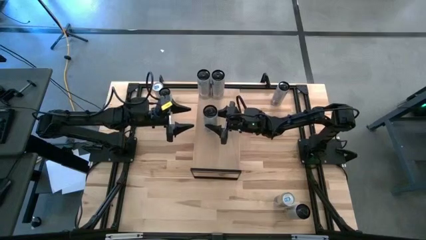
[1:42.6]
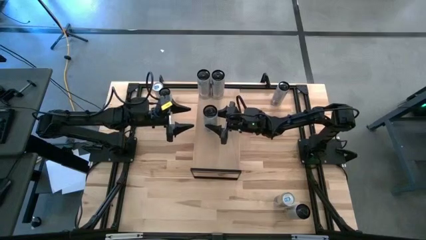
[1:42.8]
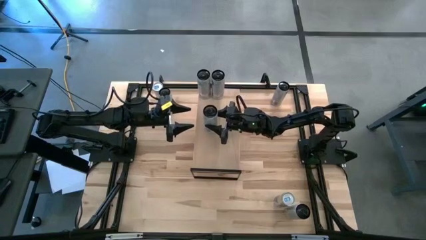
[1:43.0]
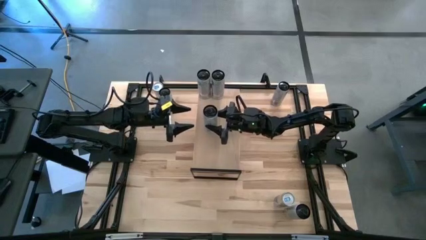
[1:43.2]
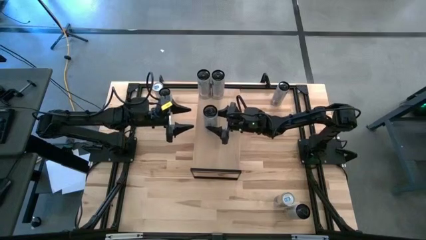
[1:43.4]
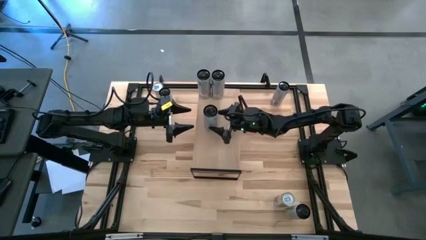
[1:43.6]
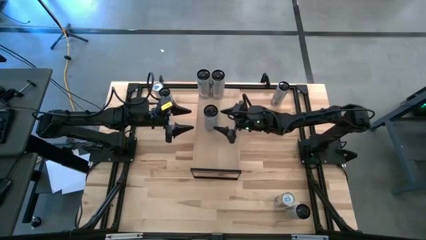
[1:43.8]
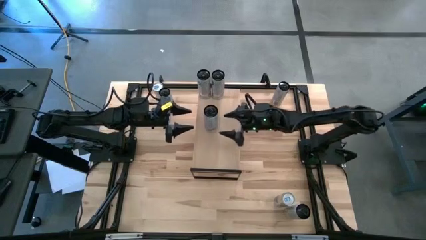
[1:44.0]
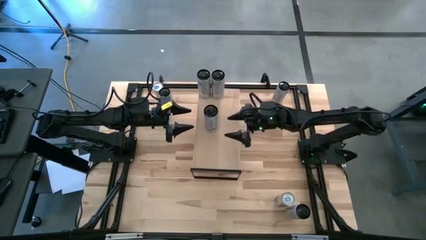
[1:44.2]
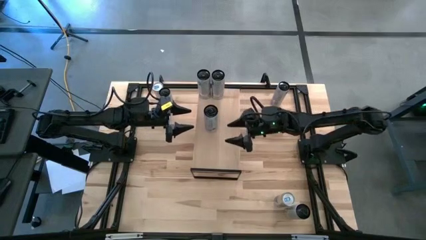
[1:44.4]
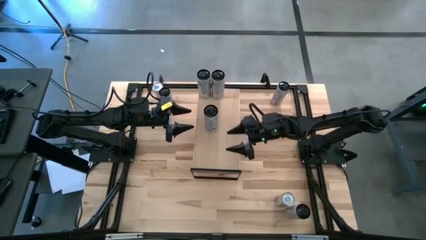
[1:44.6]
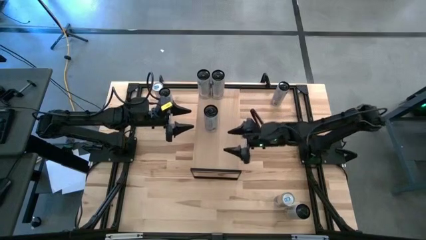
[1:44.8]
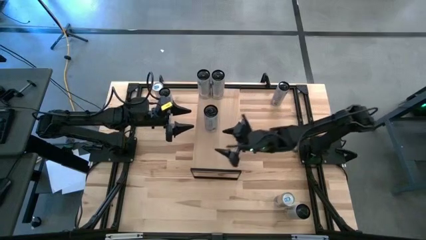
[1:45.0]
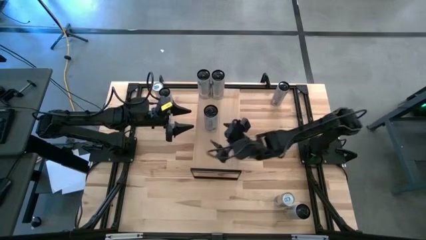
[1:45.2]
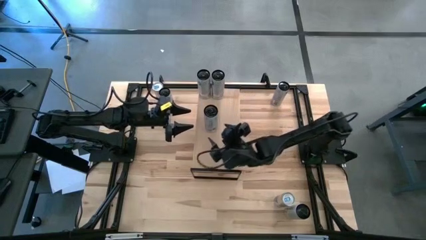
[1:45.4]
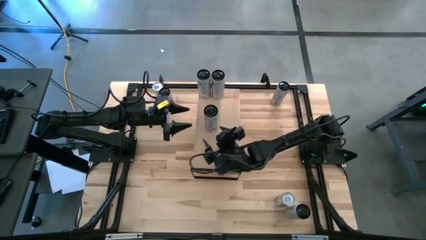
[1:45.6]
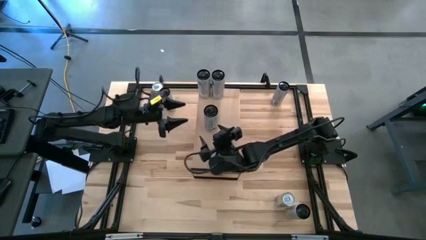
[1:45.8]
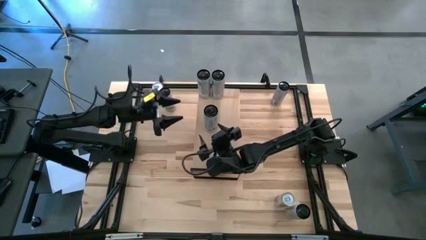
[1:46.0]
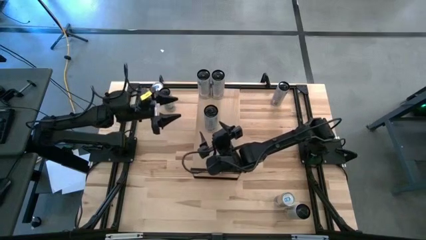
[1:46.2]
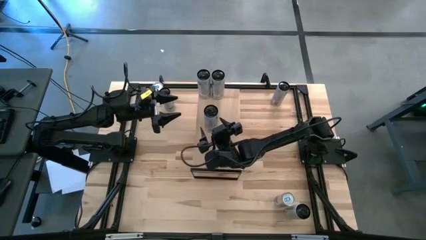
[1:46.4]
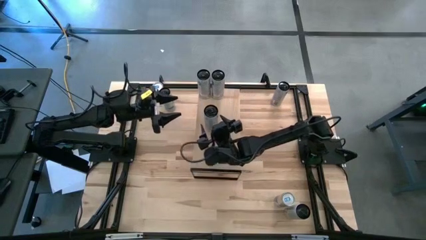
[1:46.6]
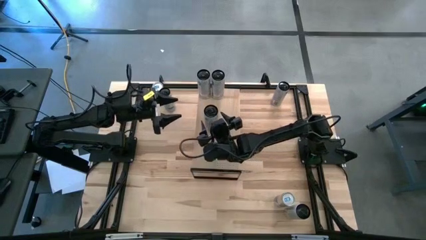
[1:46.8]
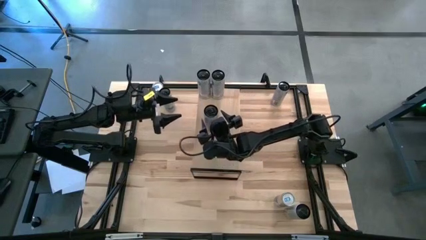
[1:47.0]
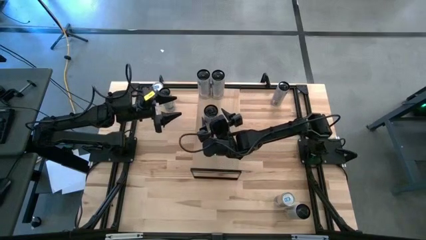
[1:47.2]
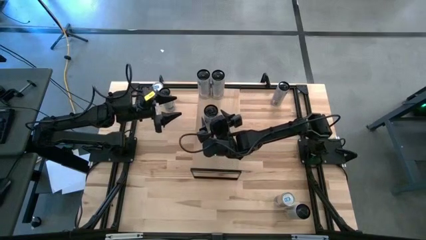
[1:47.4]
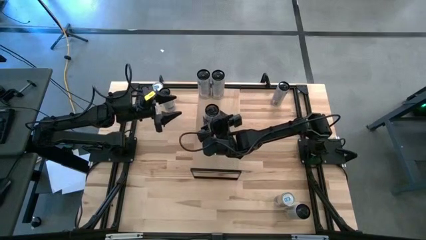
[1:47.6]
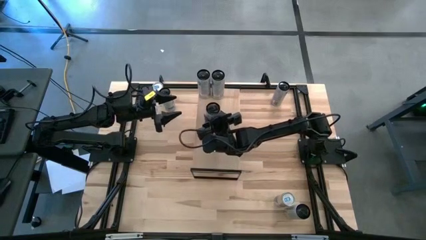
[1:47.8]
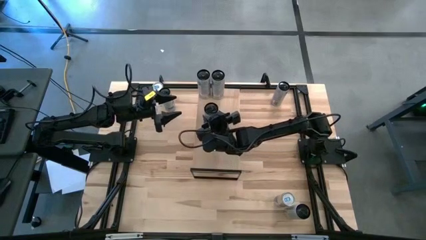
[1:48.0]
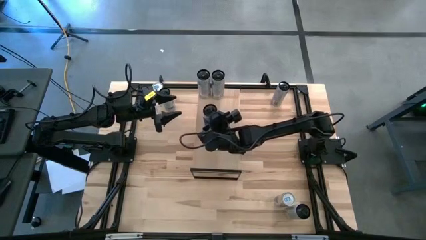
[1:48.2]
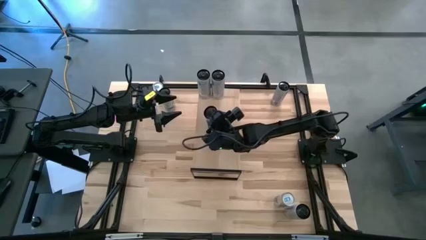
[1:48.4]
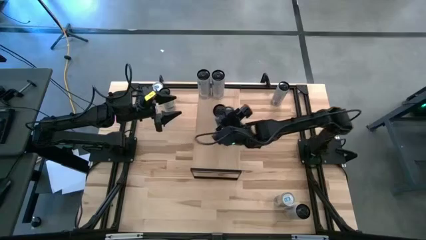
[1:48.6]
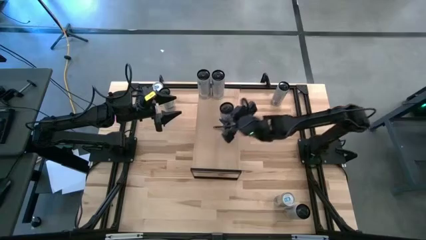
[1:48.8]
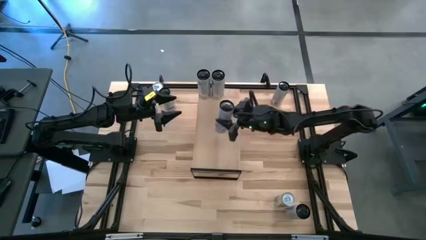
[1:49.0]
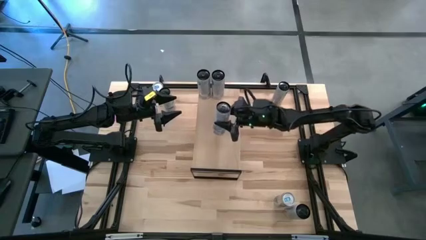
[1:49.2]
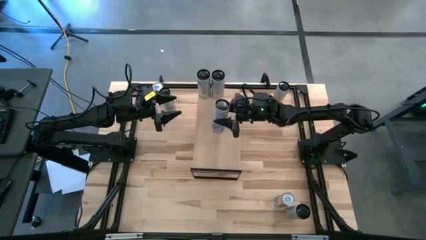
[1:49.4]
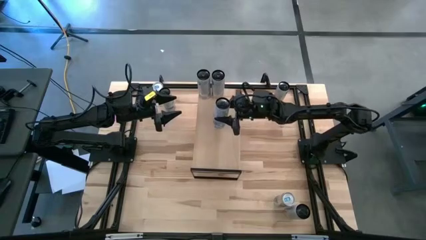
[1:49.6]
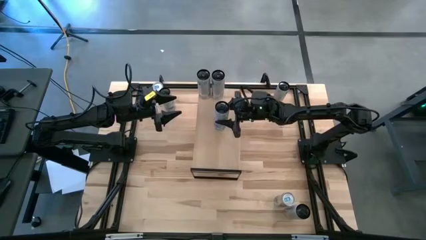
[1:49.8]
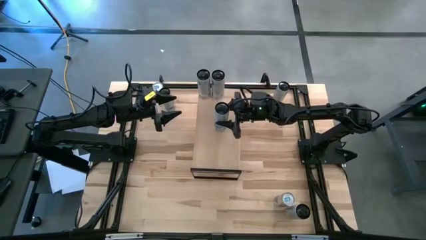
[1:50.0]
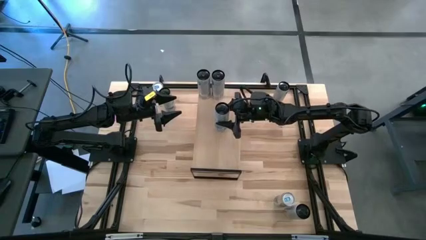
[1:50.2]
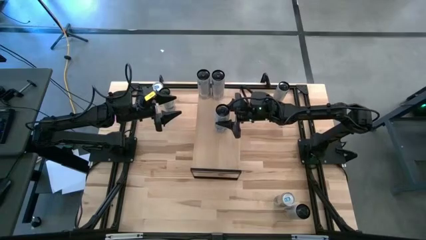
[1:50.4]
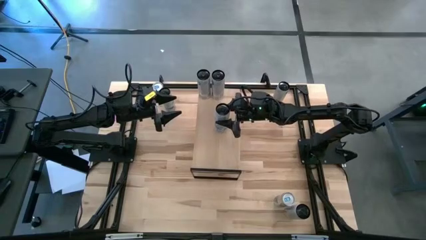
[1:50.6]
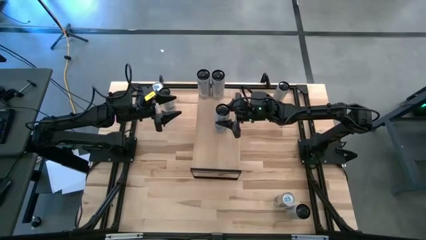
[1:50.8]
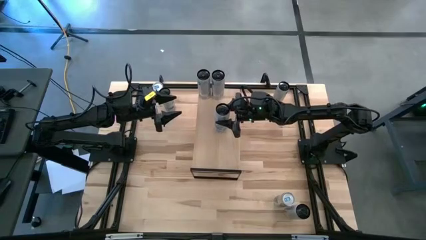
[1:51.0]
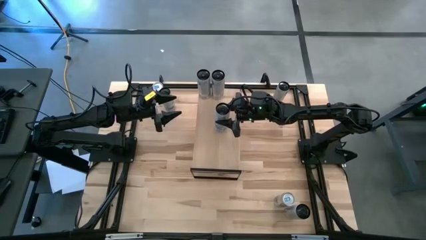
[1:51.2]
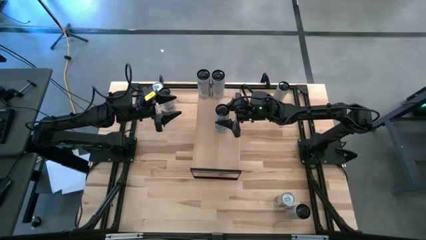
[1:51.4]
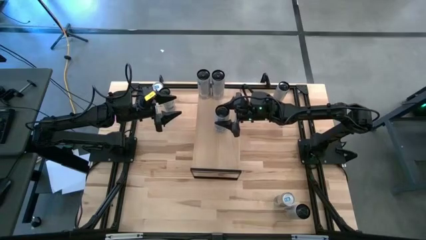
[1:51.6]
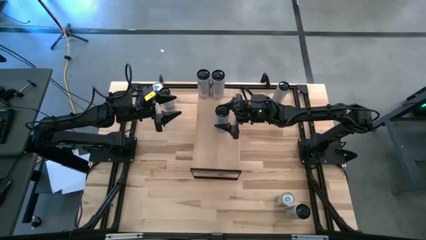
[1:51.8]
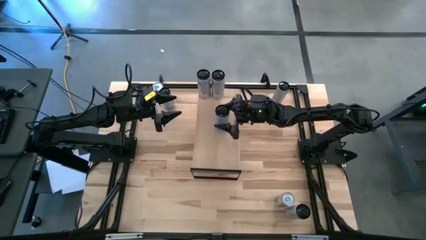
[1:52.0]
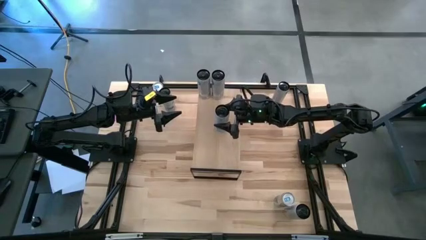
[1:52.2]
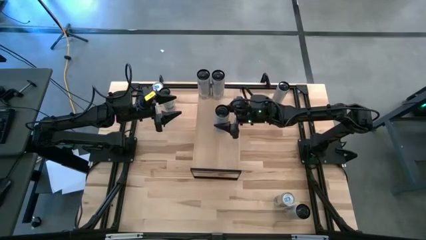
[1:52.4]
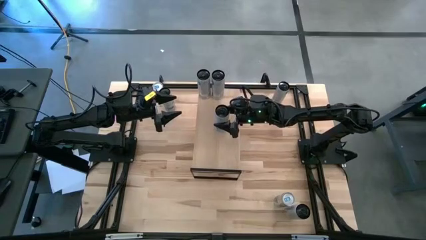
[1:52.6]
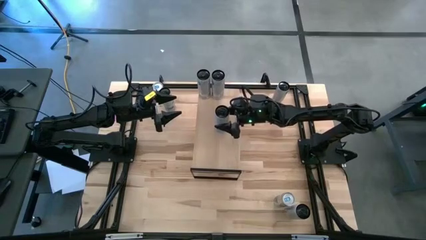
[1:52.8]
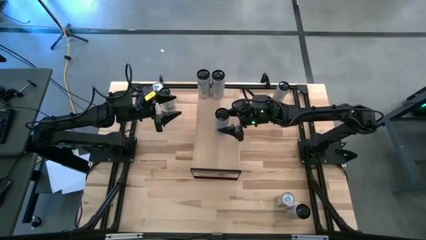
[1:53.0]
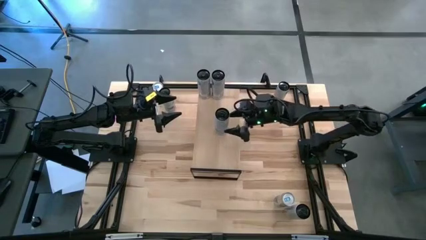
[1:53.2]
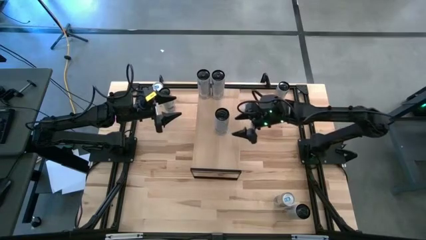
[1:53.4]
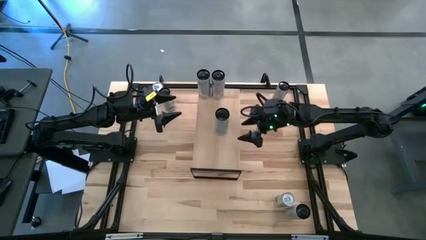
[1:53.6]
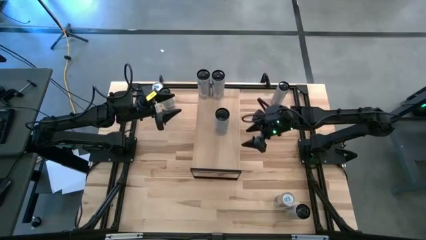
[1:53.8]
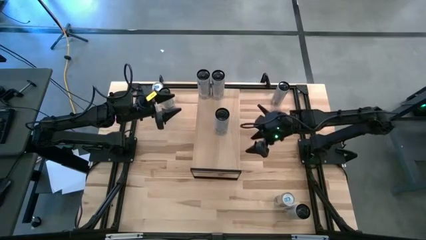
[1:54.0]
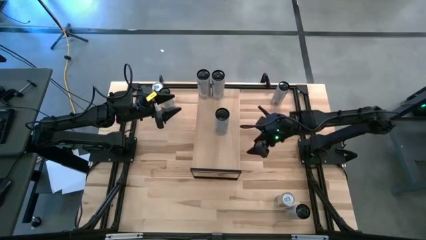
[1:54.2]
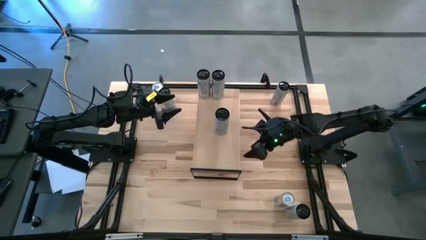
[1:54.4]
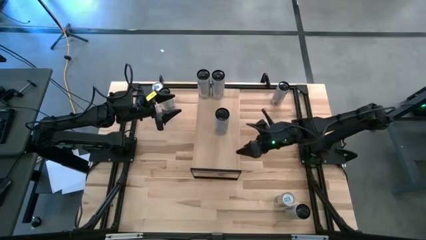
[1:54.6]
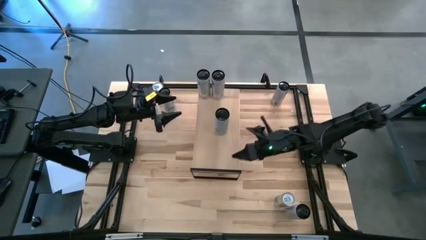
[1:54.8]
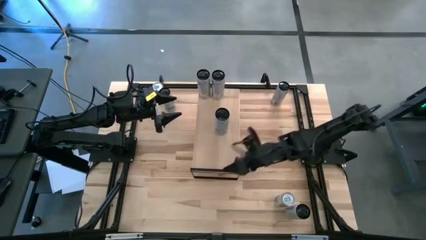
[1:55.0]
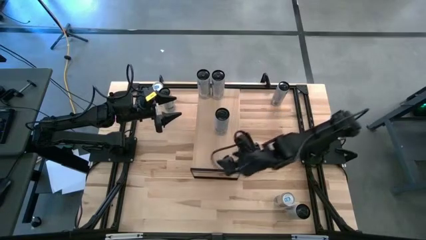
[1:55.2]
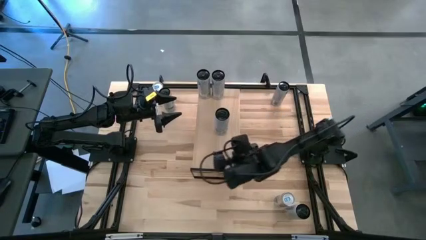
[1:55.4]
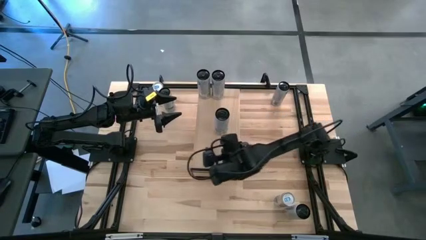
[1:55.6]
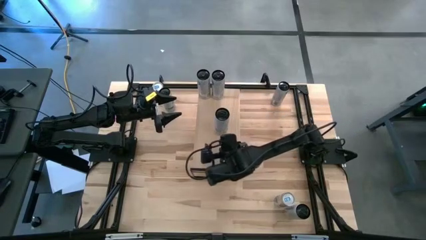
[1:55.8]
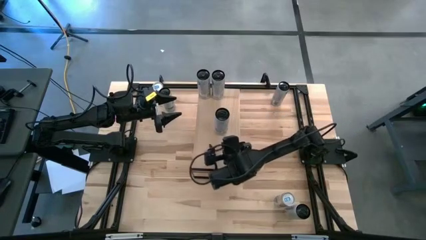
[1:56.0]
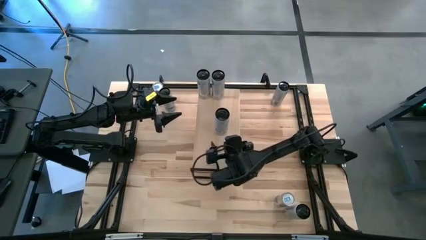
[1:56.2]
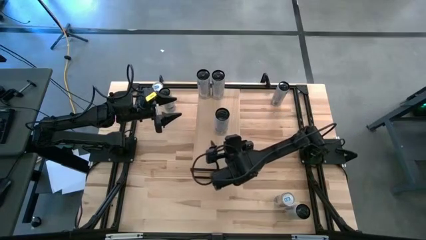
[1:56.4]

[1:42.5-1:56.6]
Task: Place canned beverage on shelf
Put the bottom white blue soda can on the shelf
